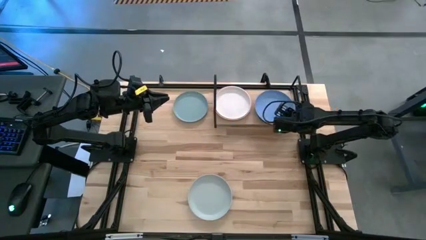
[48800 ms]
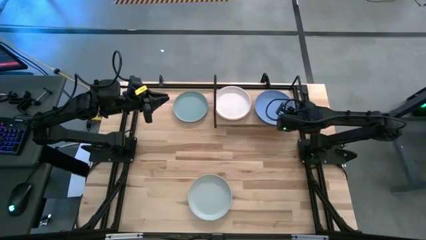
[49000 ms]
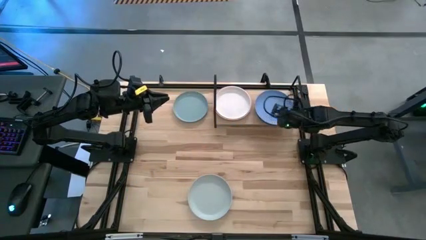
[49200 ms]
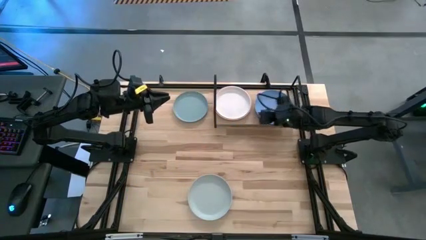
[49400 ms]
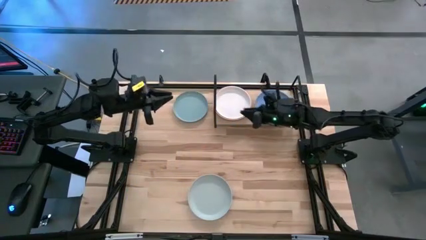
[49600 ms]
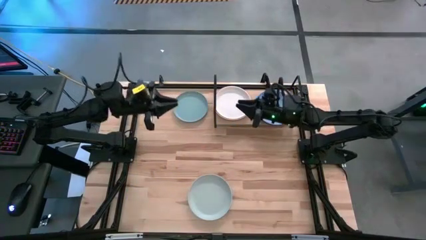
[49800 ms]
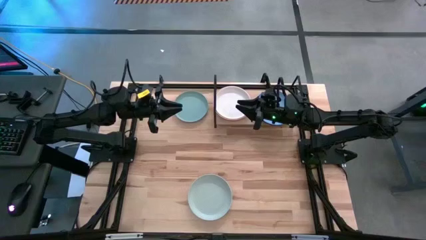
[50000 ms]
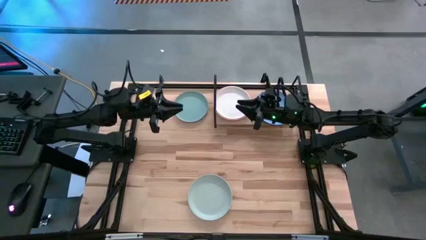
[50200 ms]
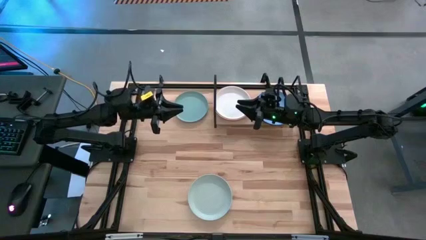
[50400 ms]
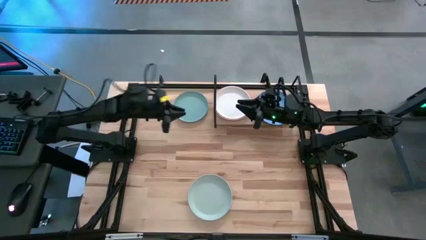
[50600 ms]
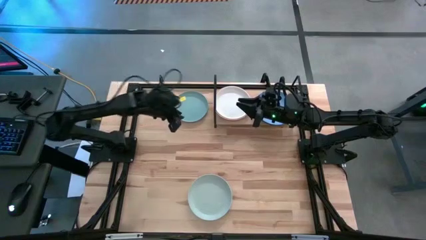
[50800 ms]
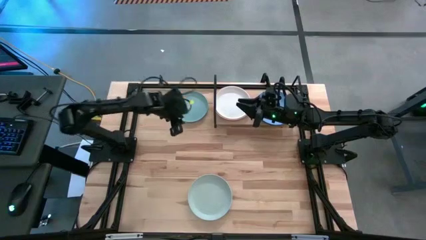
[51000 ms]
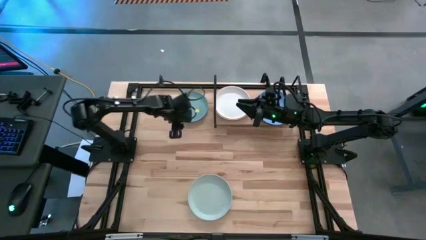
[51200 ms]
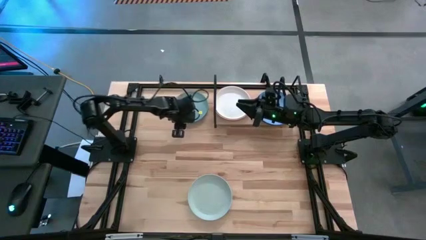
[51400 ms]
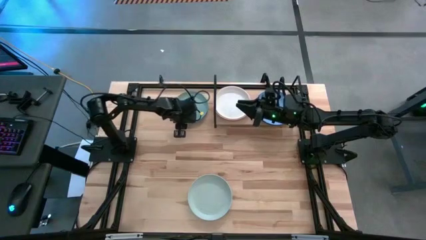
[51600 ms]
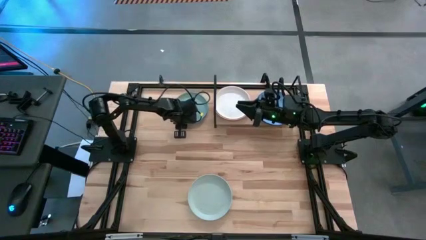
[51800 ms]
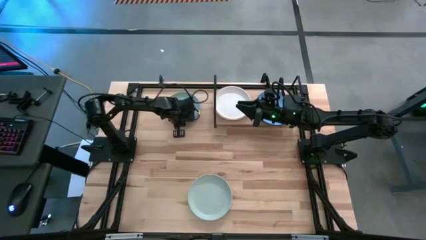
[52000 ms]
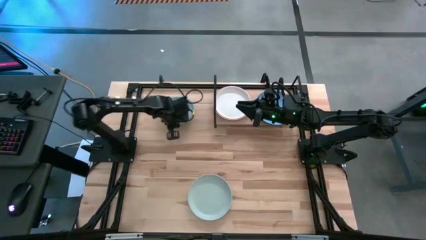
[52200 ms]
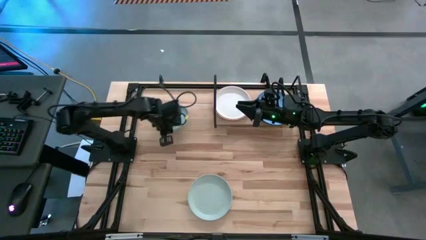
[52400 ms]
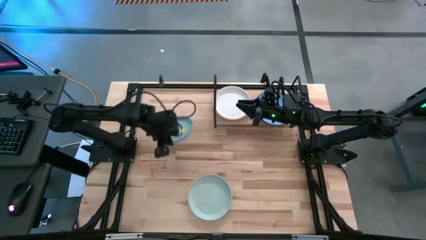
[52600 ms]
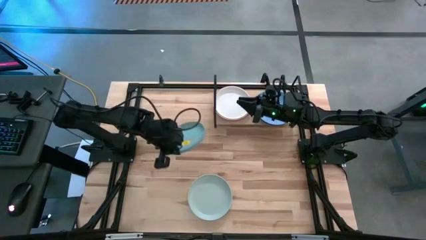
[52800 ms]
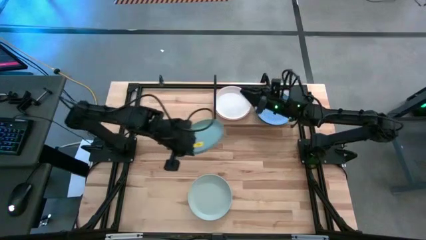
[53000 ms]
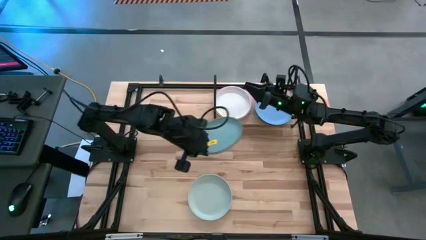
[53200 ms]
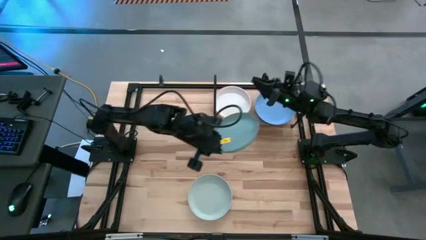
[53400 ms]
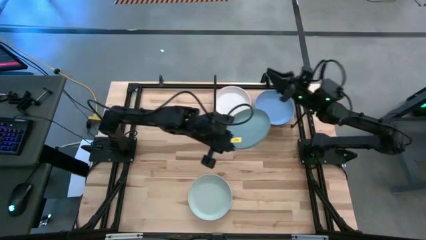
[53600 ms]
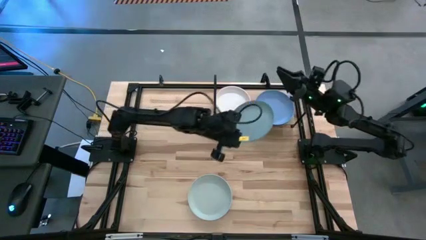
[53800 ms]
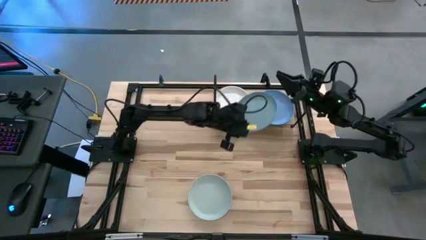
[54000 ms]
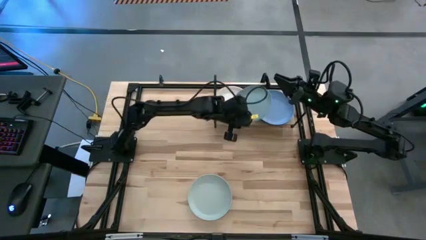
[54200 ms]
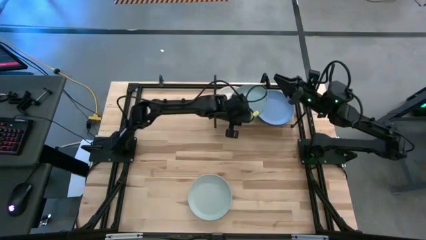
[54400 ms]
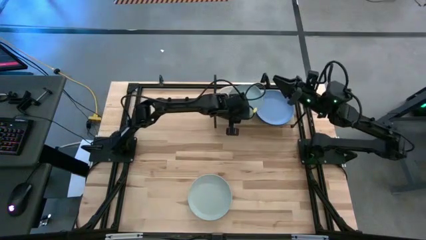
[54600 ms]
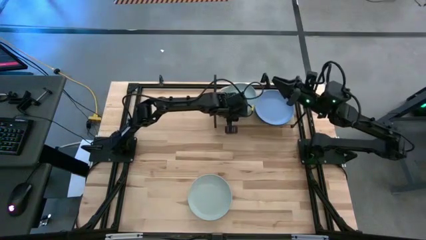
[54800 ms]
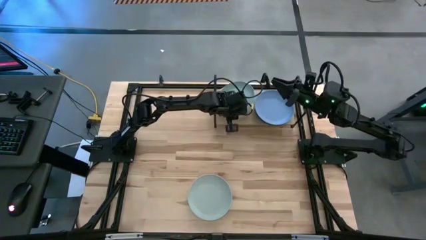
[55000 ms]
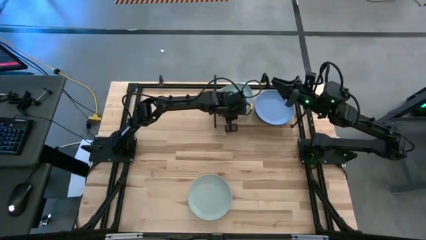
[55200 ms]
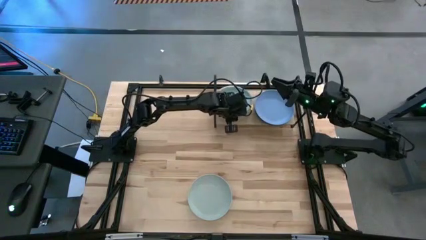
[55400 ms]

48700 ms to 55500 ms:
Task: Place and stack plates onto a shelf
Stack the light green plate on top of the white plate on the shelf

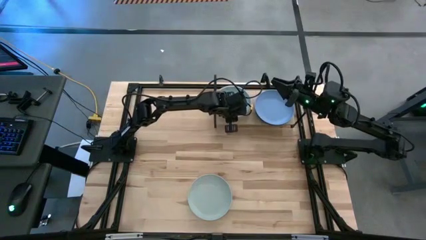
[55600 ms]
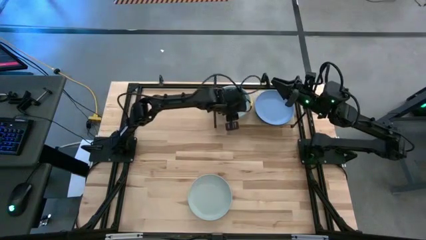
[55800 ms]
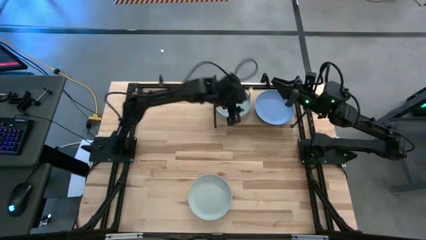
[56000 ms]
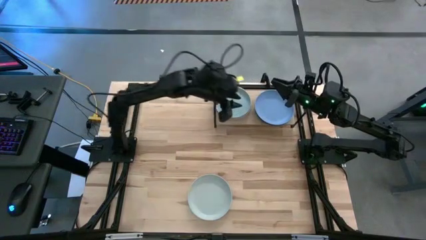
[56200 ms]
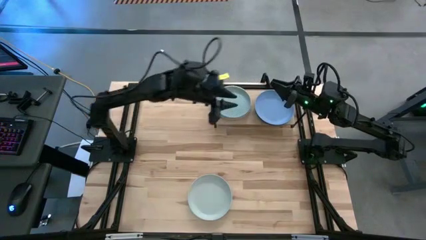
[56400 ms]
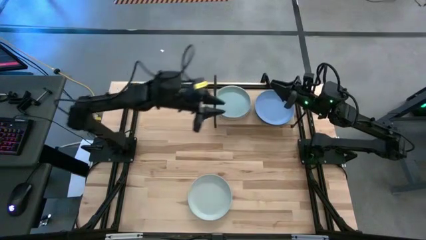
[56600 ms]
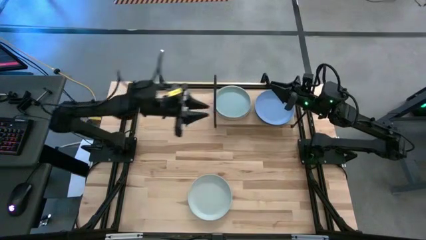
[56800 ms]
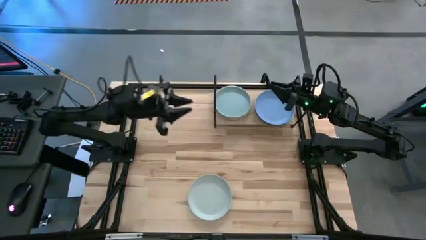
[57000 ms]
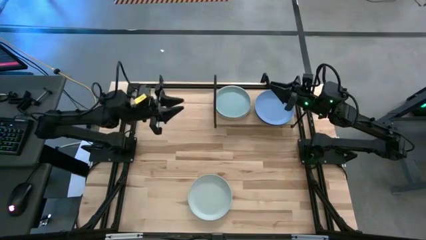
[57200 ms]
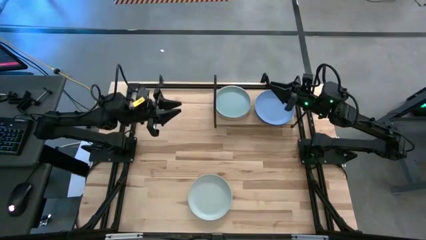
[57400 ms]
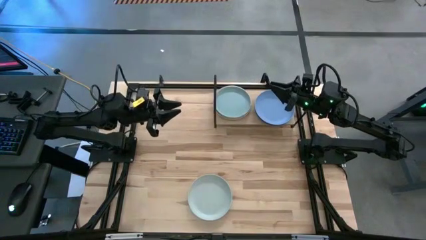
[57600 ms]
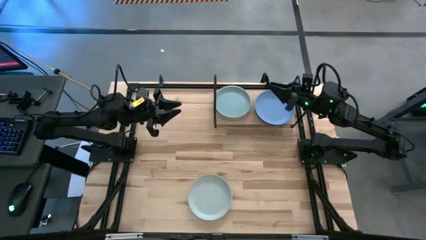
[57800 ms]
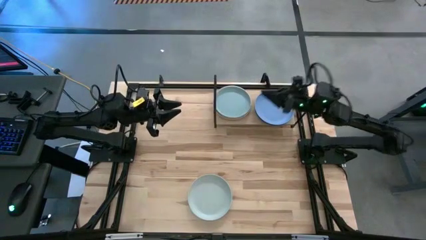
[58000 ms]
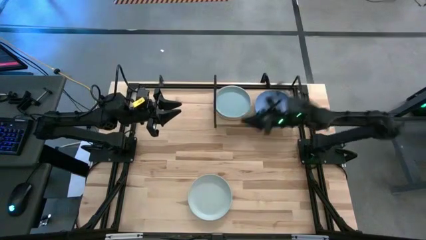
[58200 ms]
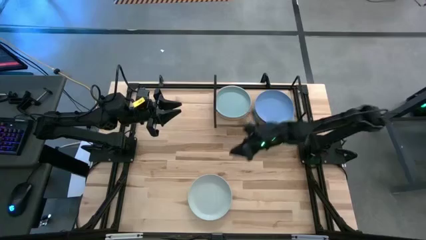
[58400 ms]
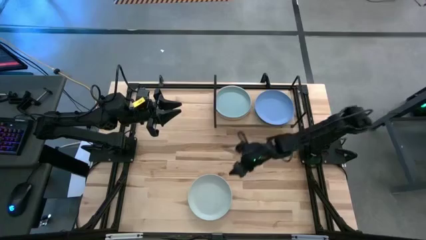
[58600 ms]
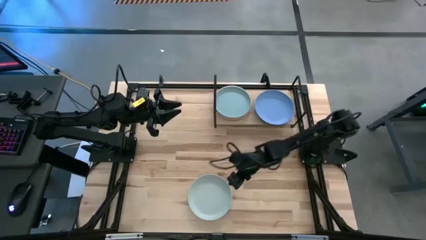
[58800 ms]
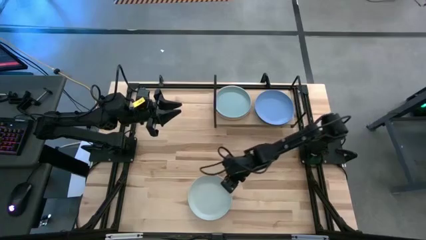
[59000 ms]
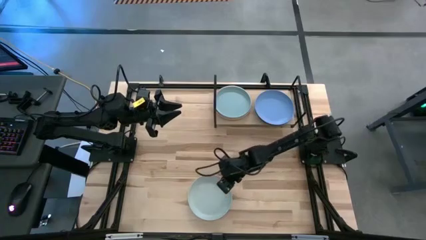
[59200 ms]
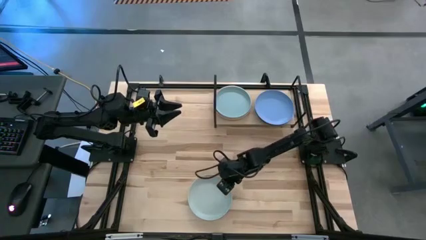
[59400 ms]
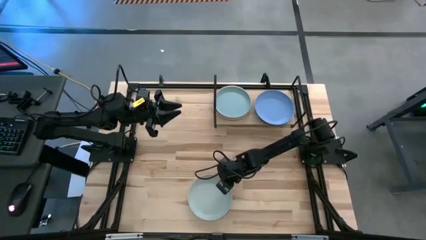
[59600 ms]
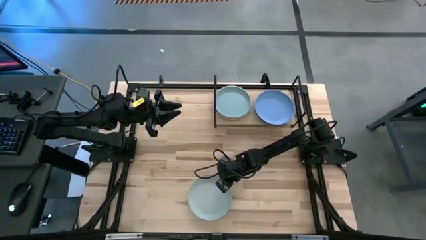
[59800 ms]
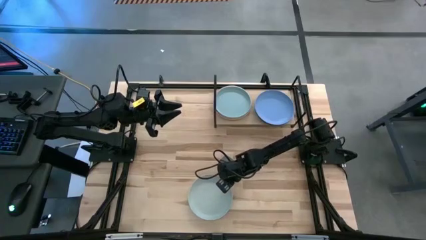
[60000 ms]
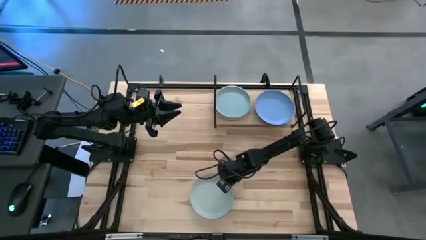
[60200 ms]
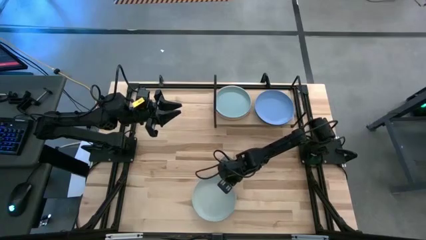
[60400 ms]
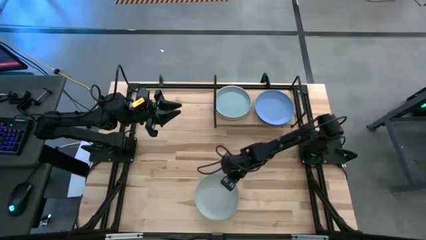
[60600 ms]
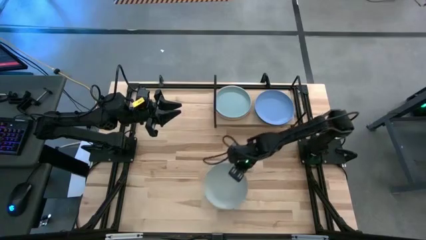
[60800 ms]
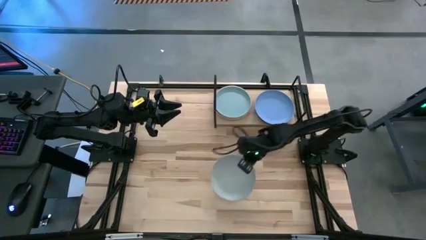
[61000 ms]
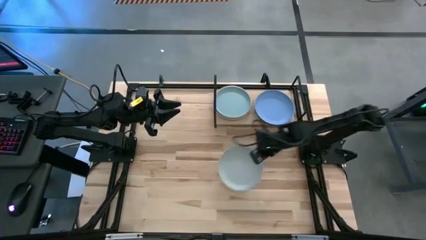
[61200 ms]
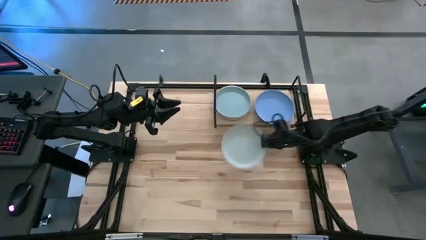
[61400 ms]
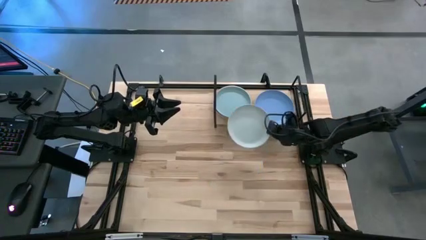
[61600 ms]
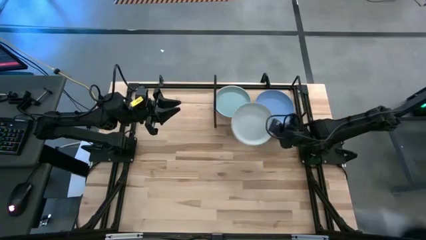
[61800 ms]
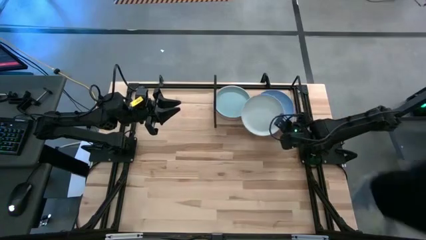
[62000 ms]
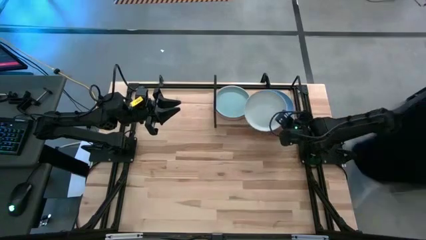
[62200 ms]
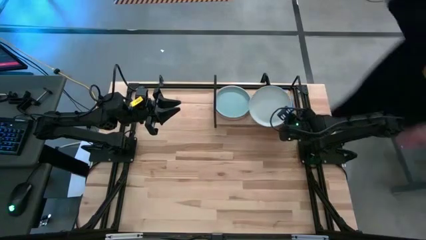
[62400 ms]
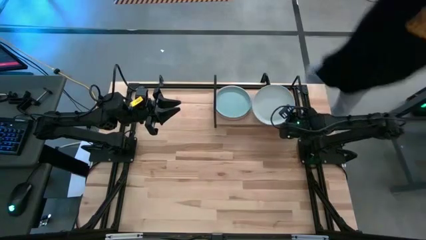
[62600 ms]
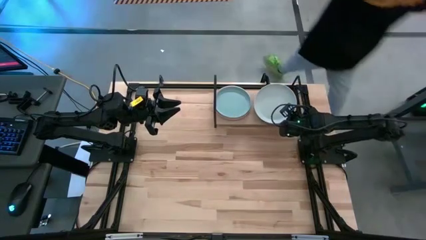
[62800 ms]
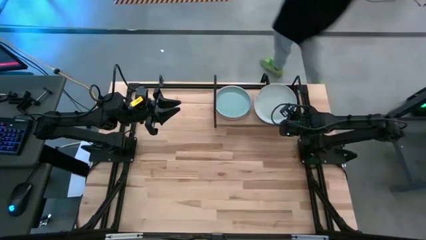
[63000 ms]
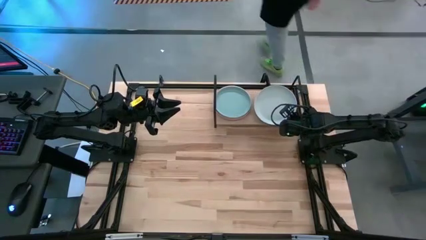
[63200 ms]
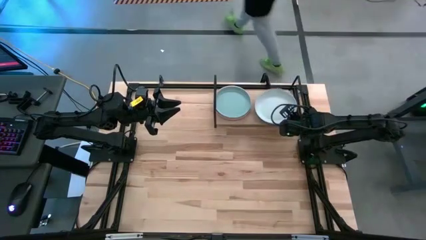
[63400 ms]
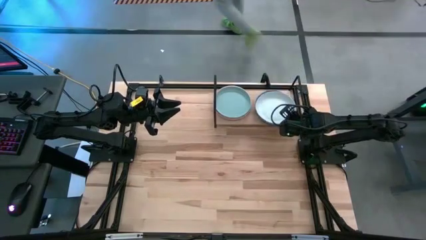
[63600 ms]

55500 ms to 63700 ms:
Stack the gray plate on top of the blue plate on the shelf

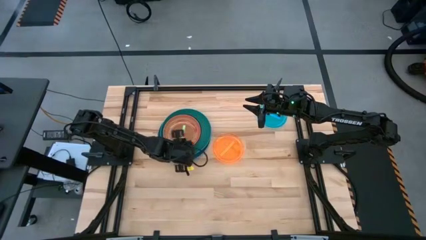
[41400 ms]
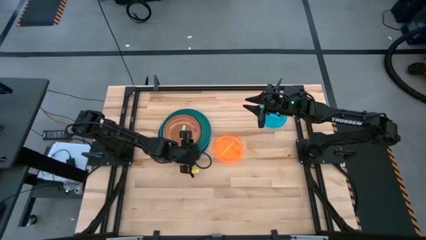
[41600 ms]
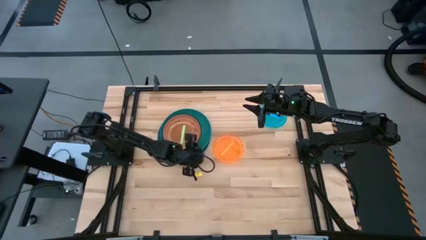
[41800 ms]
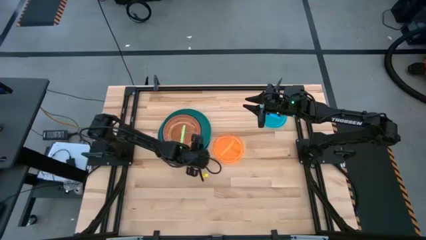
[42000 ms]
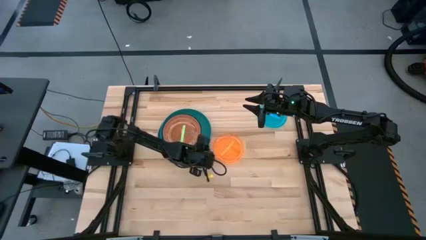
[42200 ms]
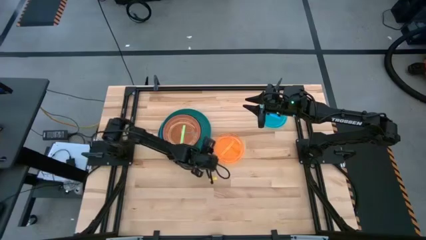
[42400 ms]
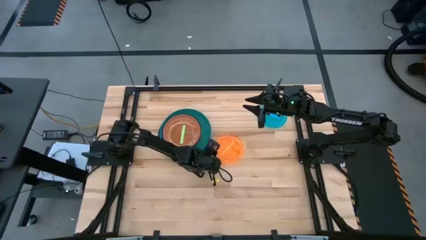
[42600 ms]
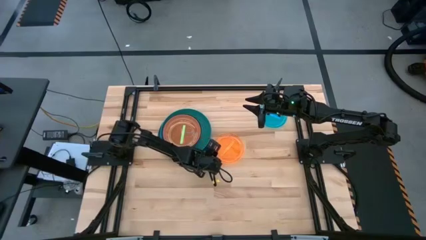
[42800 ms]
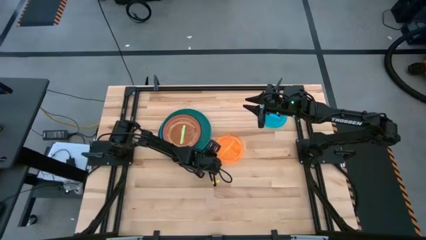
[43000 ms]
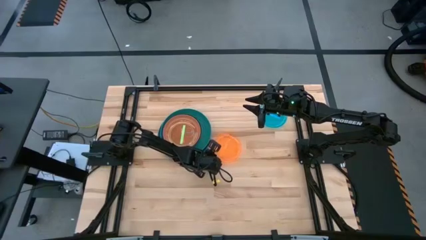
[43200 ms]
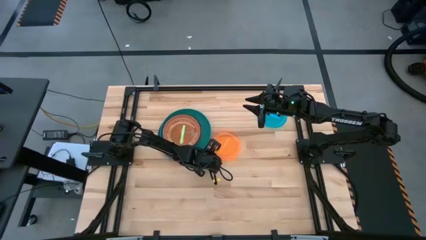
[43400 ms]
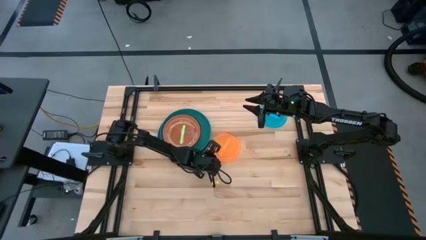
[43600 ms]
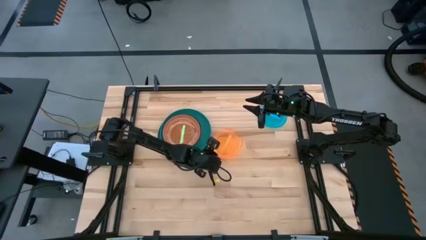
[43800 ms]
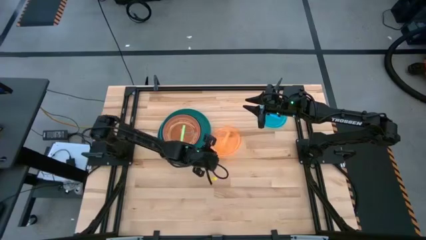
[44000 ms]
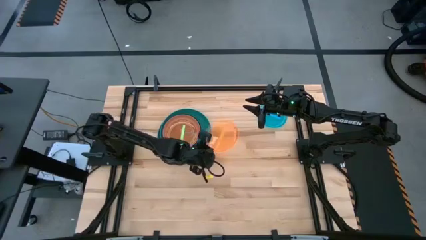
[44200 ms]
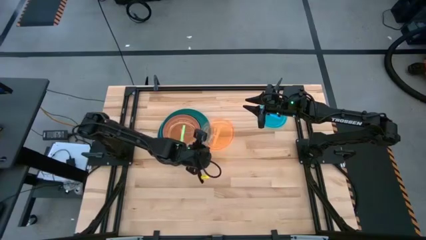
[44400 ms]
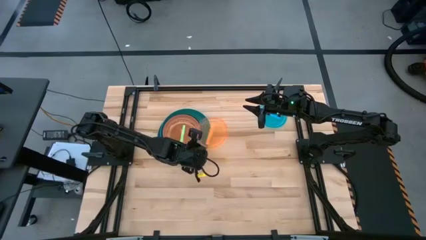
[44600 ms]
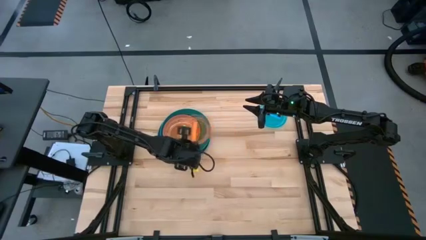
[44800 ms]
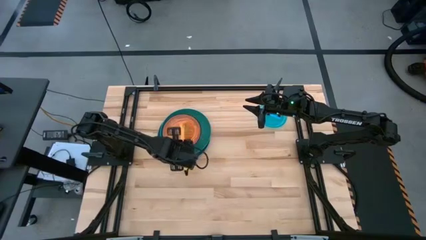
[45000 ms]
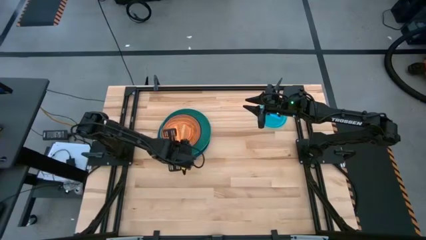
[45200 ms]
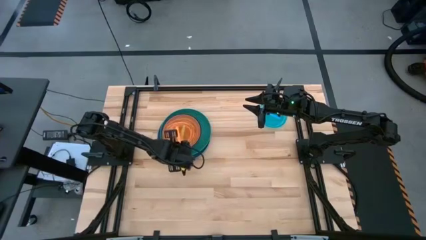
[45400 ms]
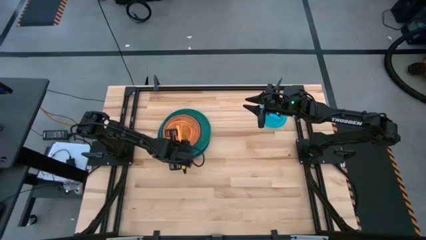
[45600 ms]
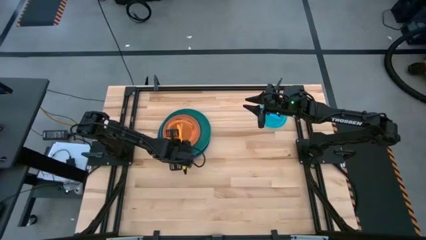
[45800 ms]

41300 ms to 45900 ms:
Task: Stack plastic plates
Stack the transparent orange plate on the transparent green plate
